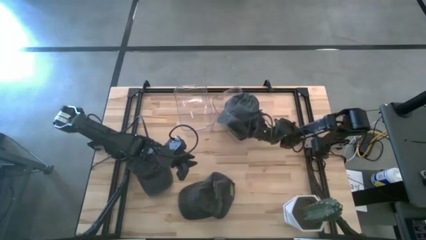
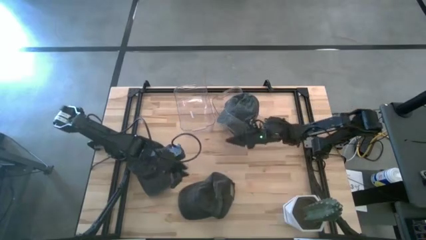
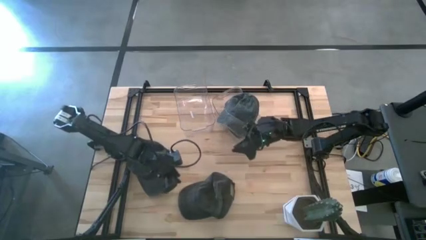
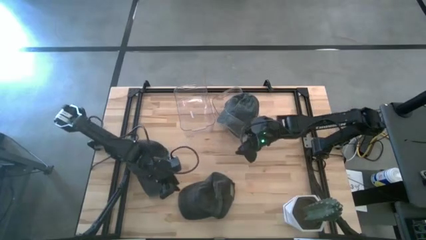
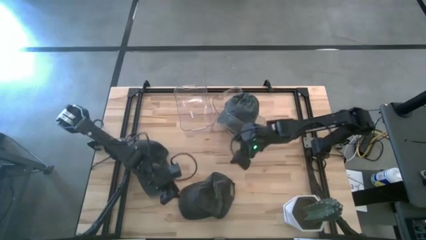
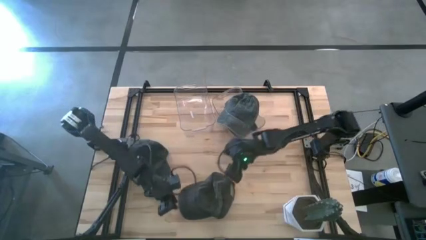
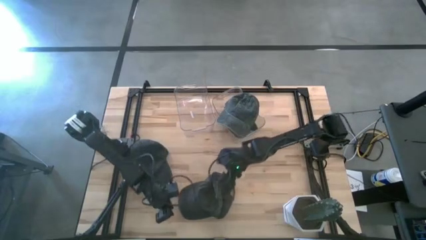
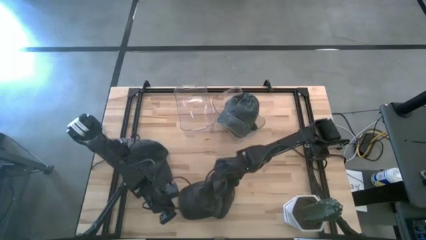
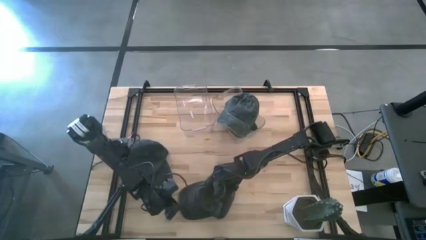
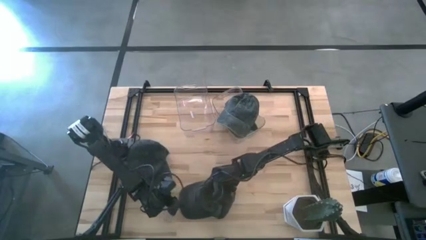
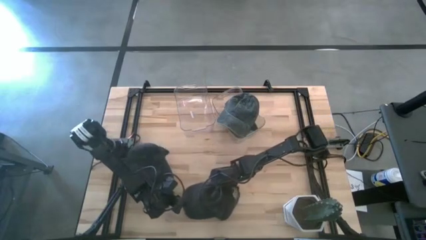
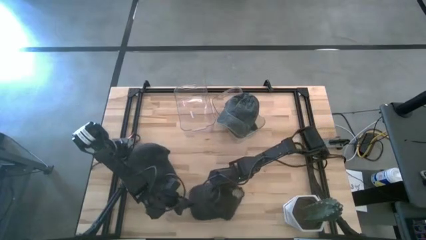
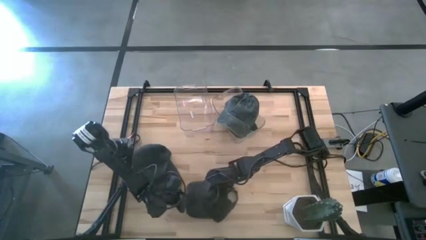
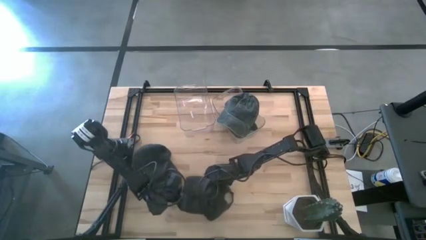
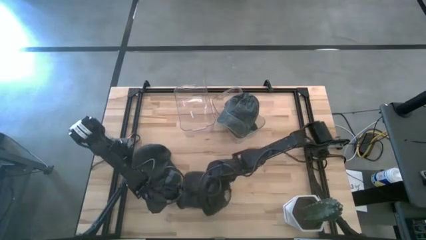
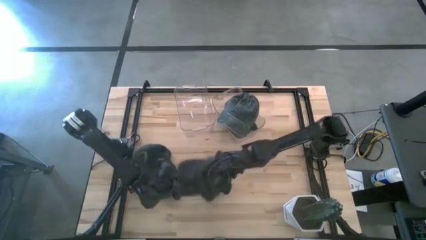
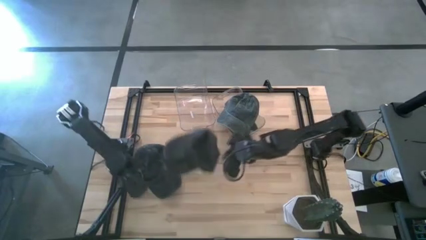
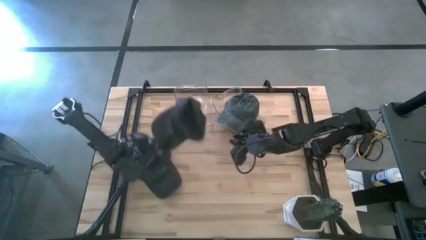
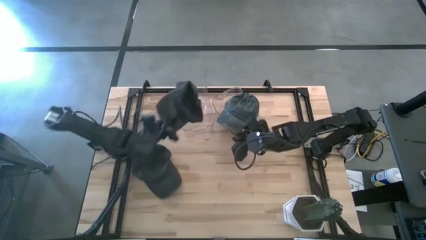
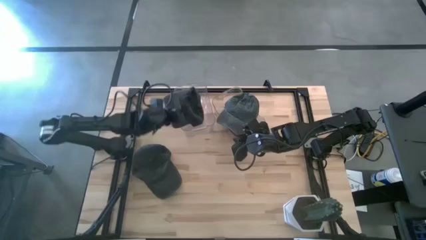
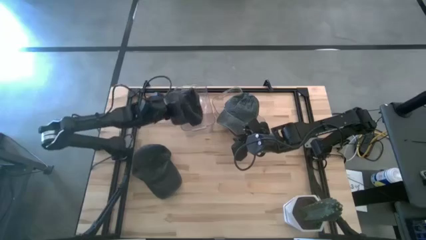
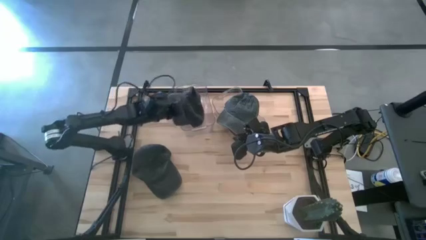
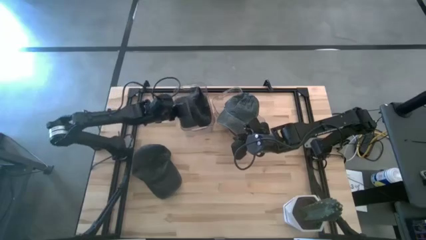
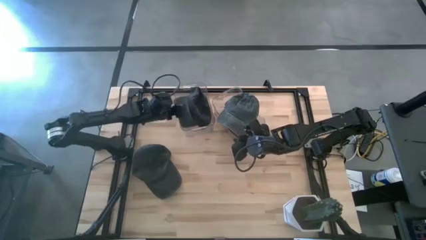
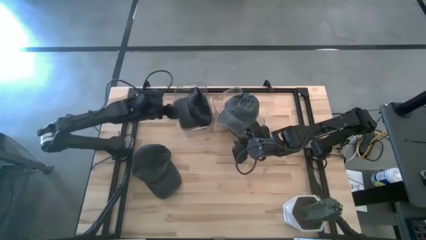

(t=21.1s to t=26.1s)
Task: Pick & Place hat
Put the bottom black cap into the left transparent bin

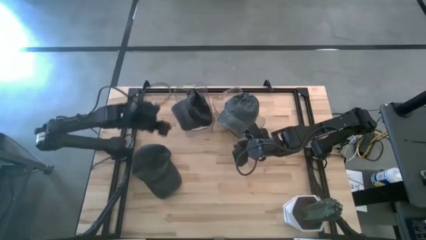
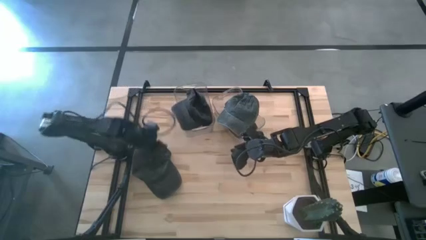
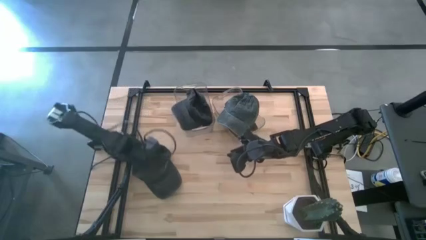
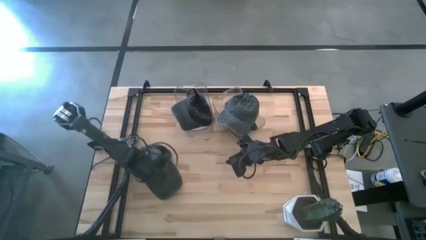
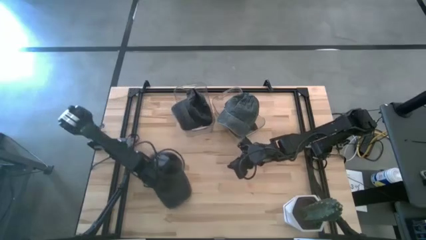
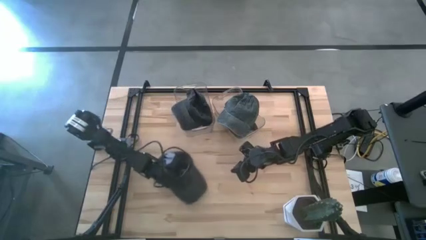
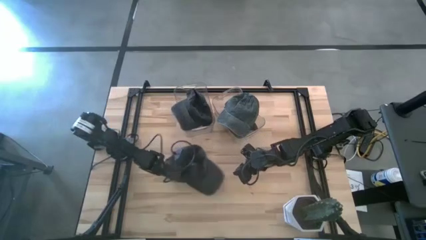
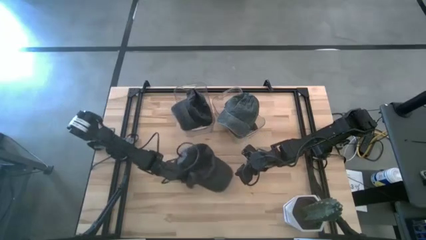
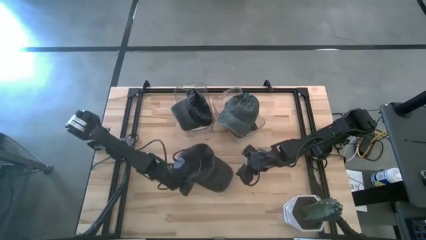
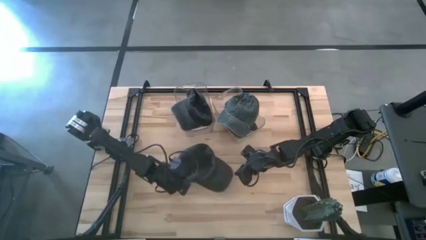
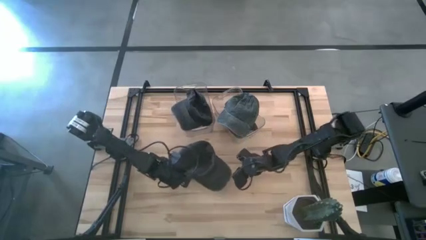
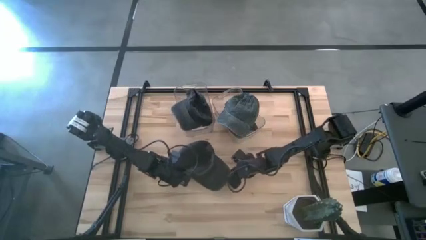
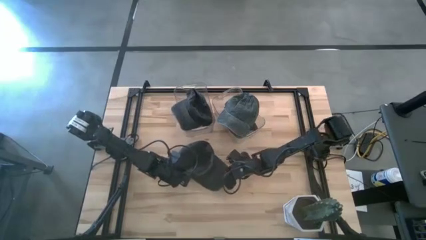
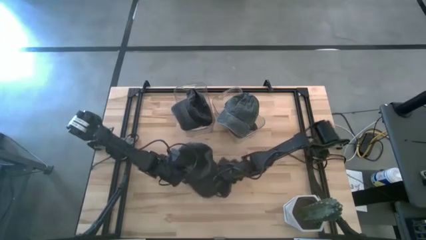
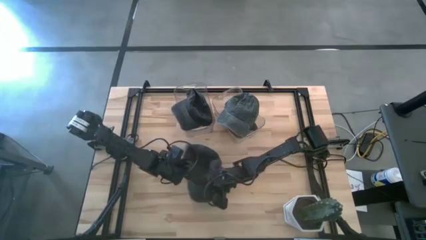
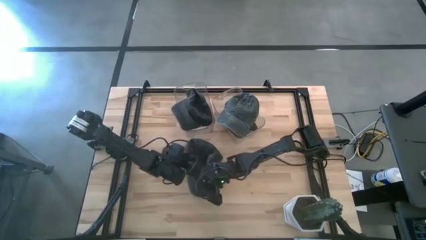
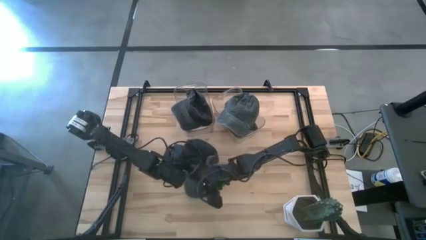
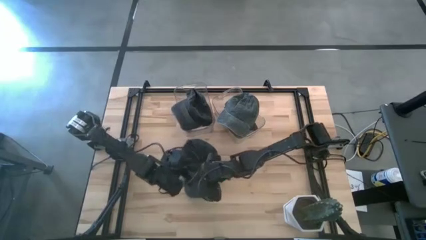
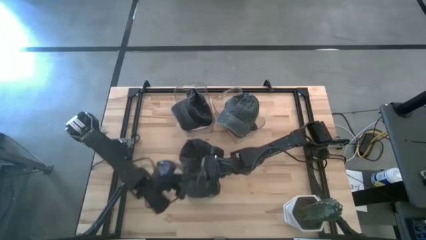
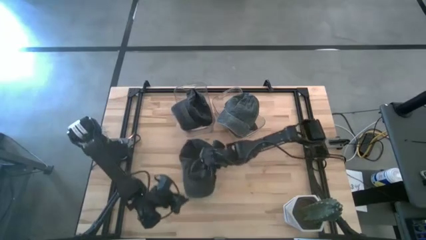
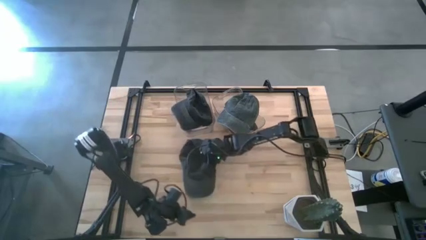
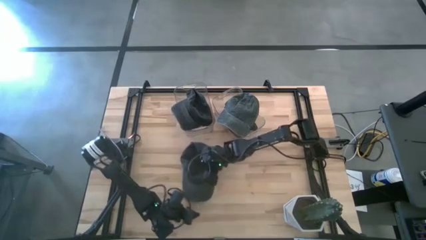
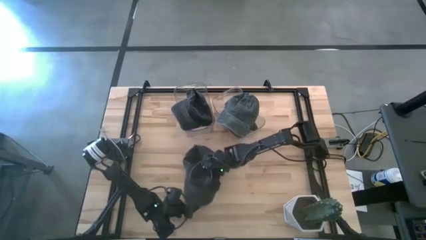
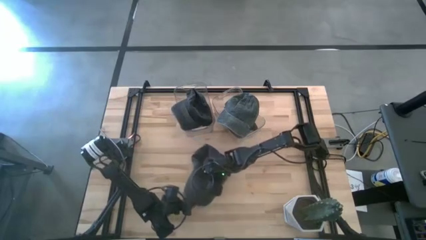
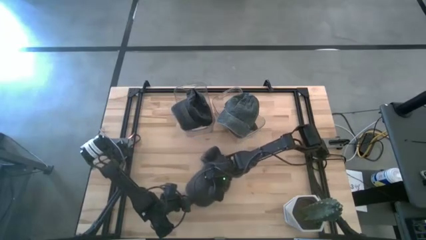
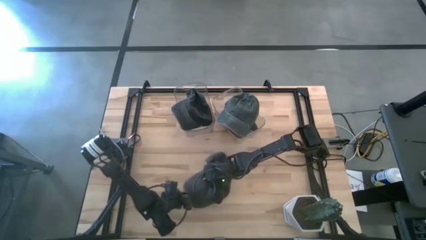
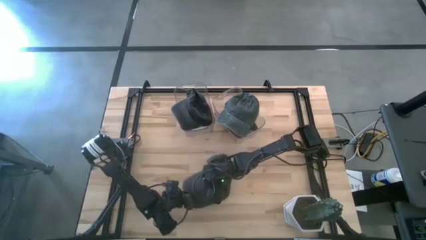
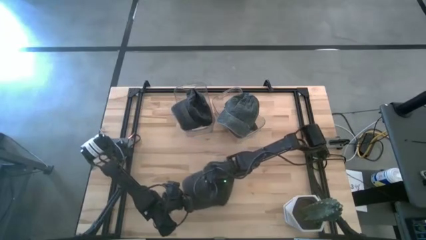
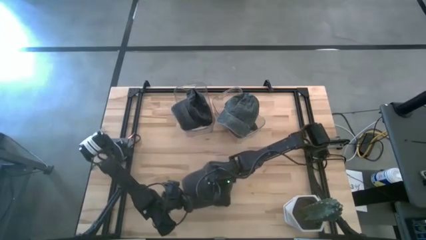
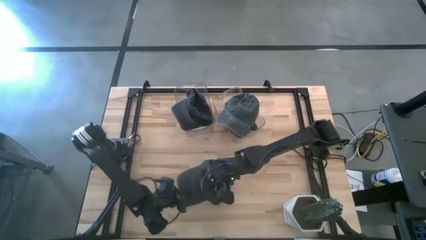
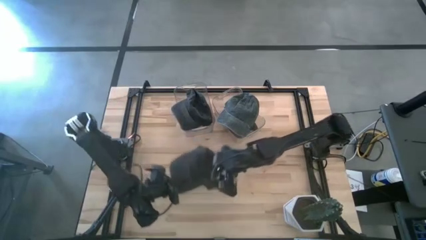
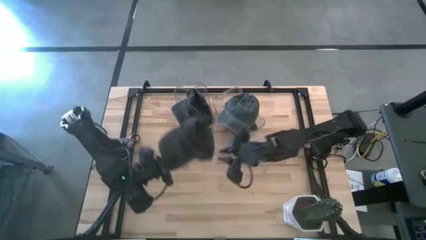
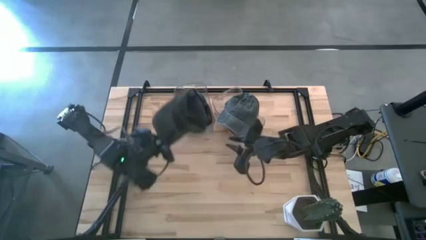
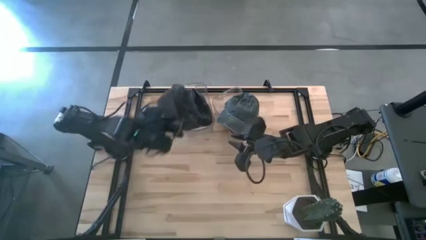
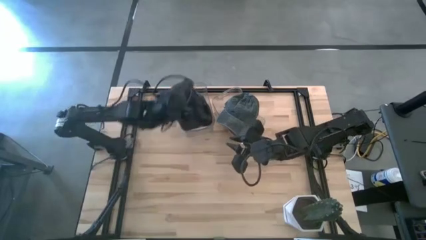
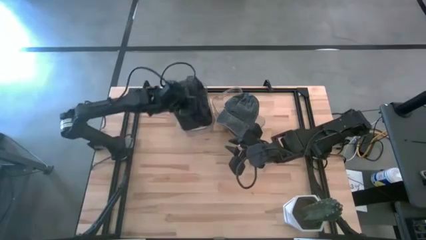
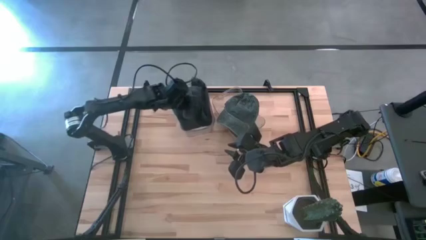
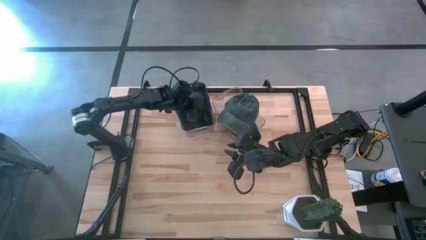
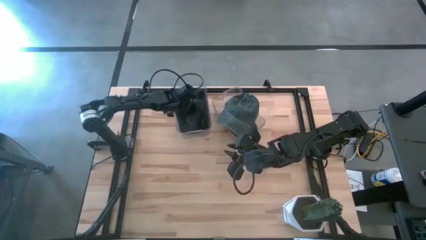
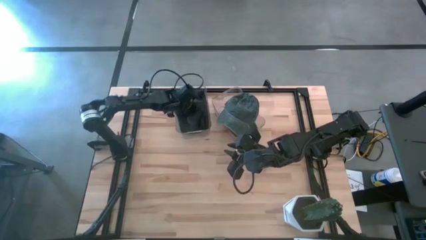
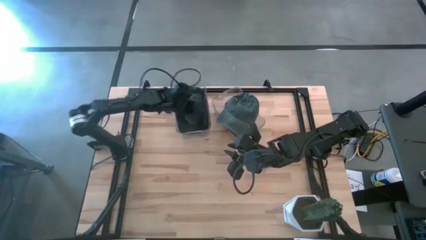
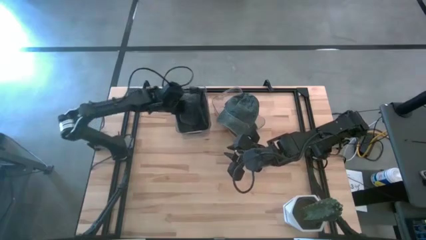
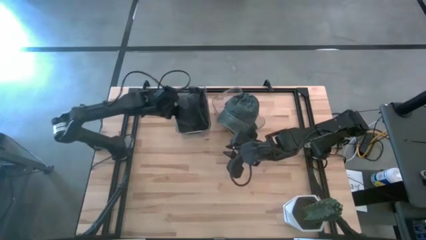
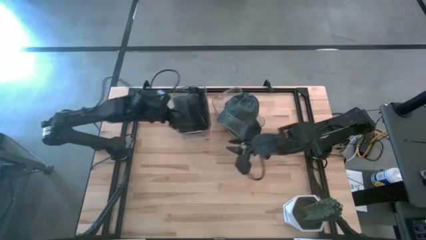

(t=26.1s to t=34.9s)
Put the black cap into the left transparent bin
